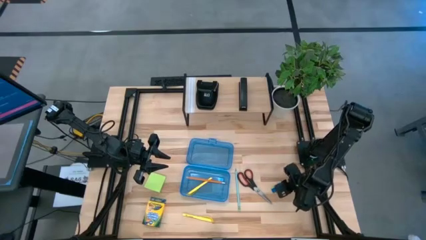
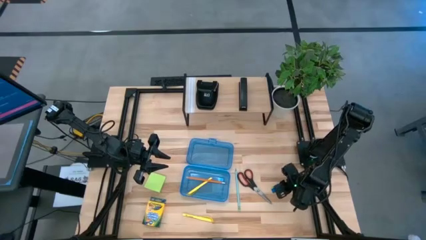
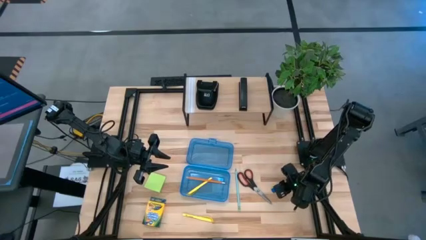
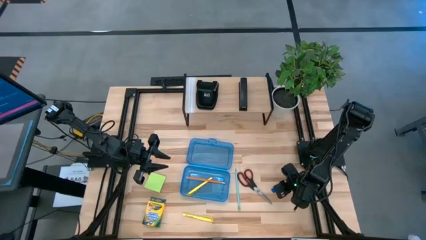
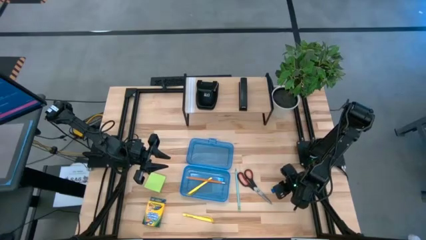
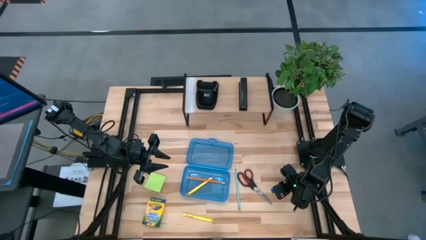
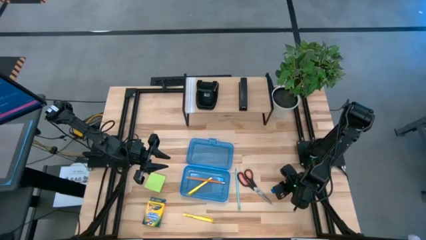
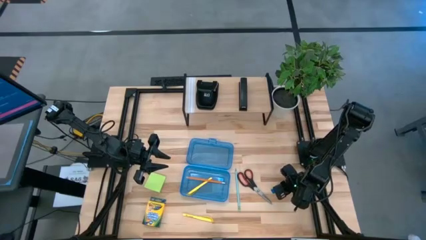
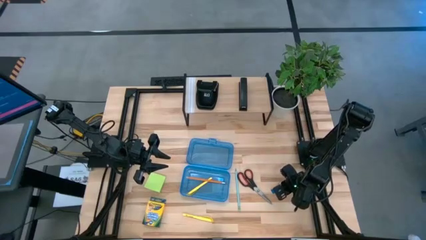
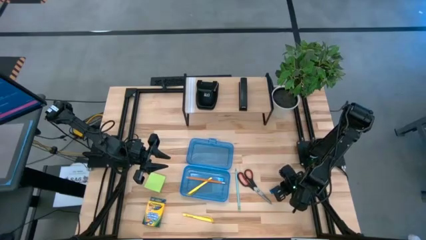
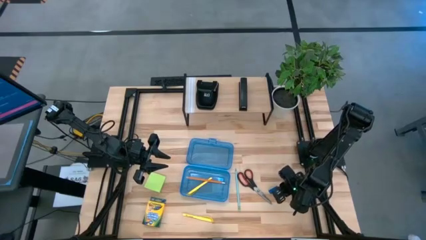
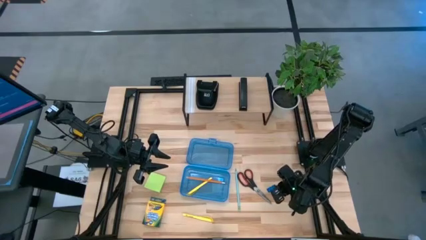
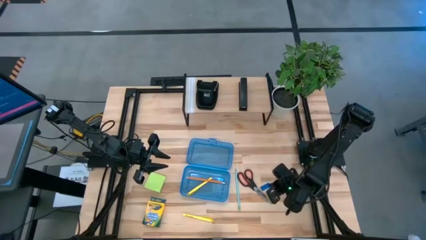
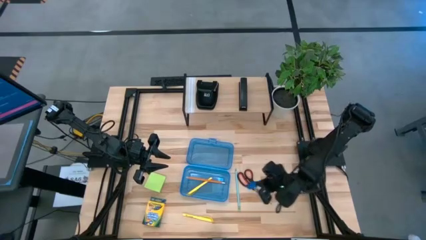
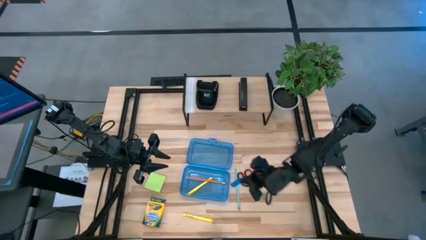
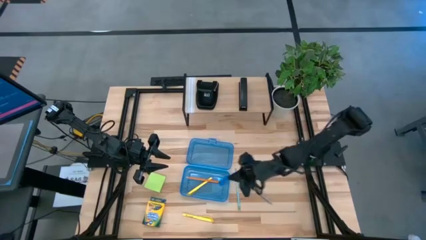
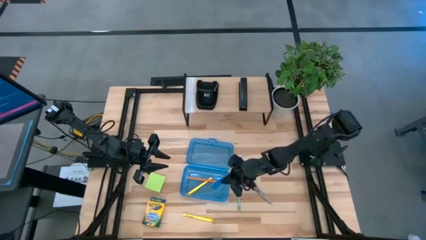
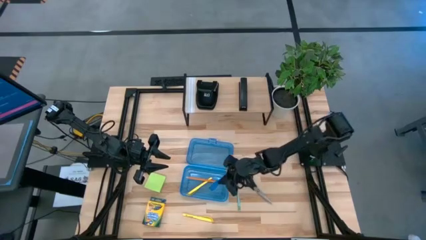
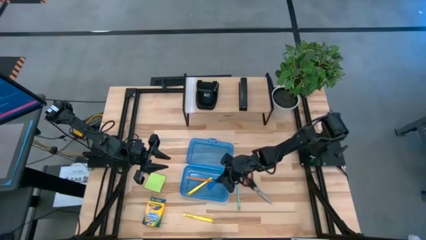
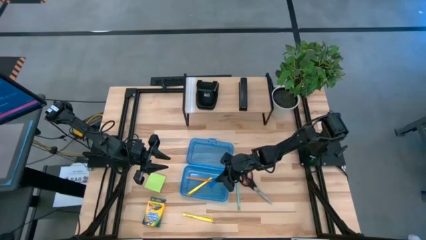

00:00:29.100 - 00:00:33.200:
Task: Pack school essentials
Put the blue eraser into the blue supply box

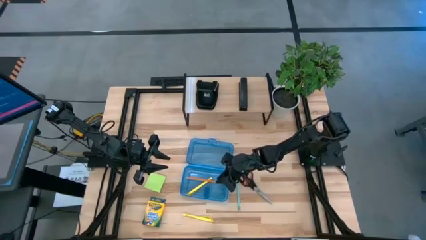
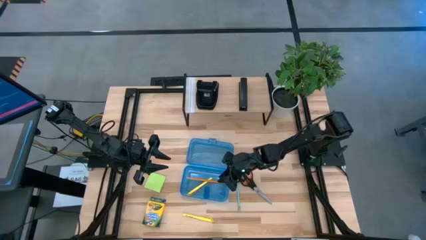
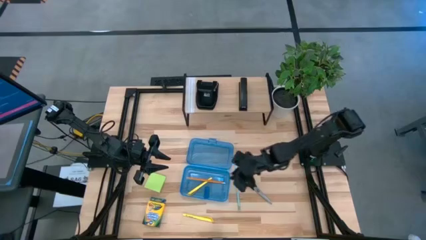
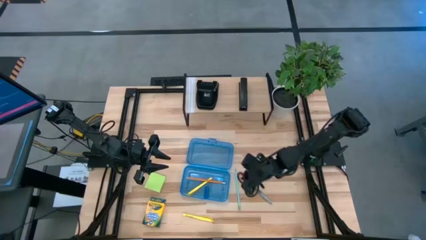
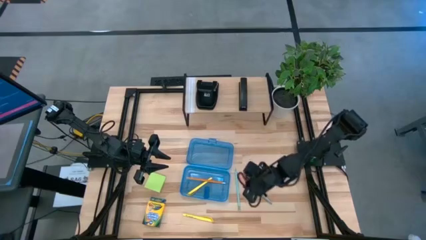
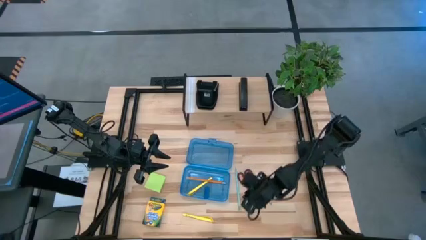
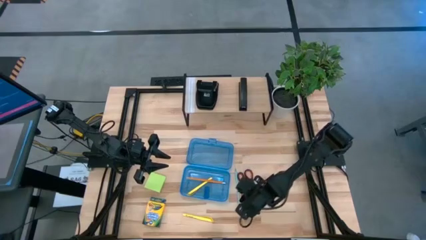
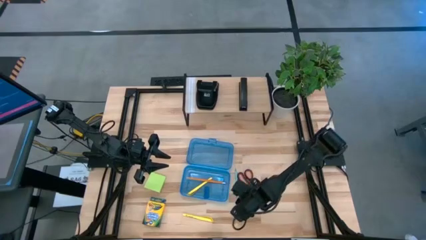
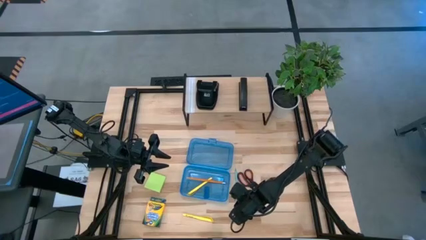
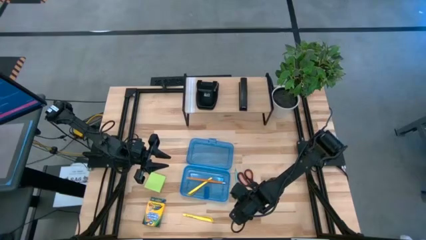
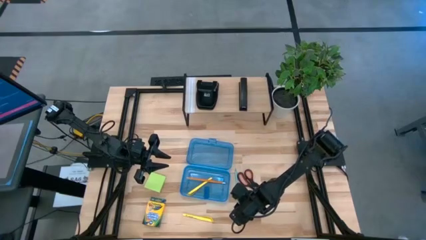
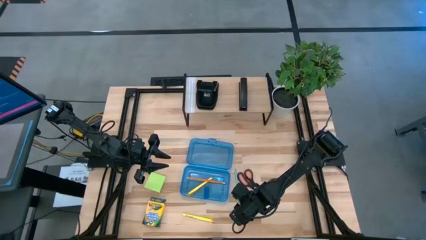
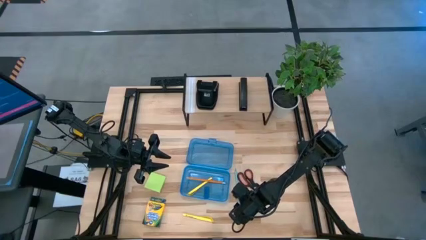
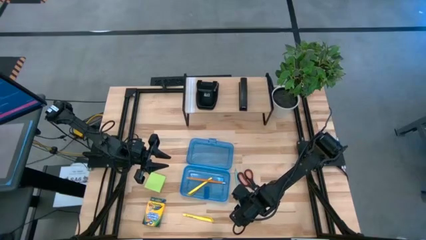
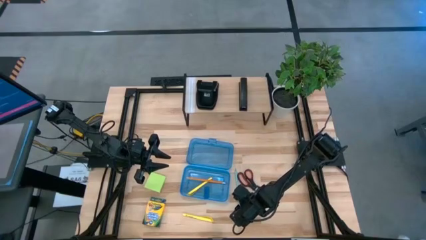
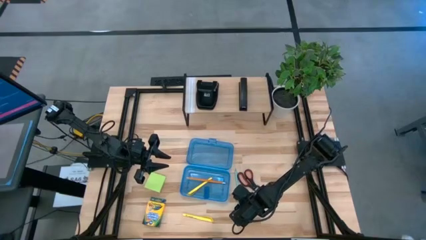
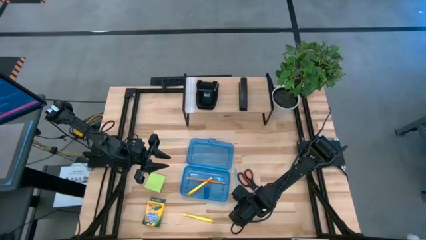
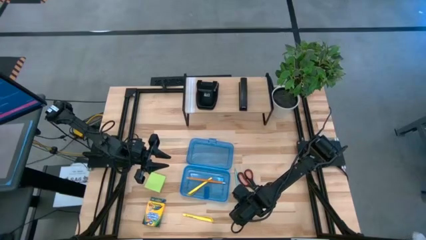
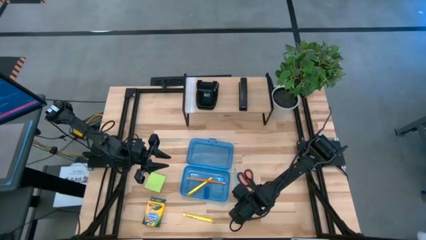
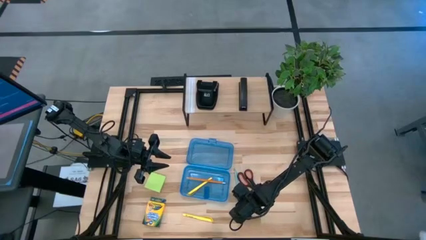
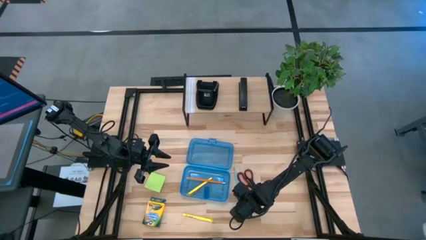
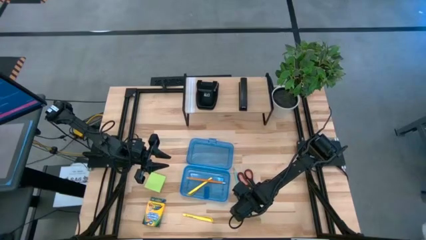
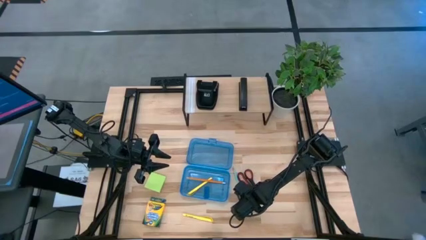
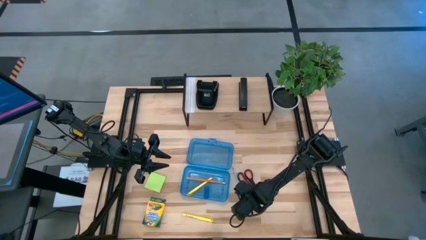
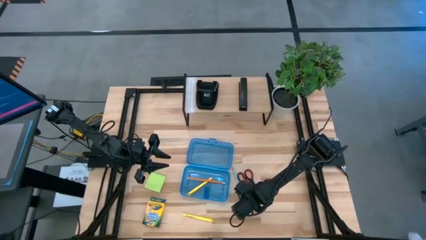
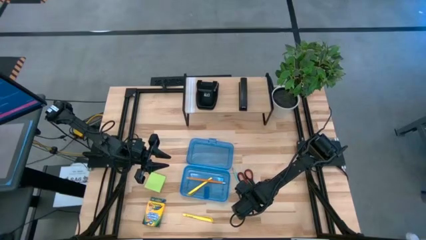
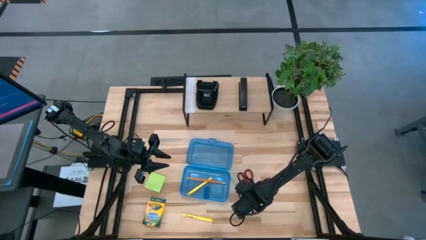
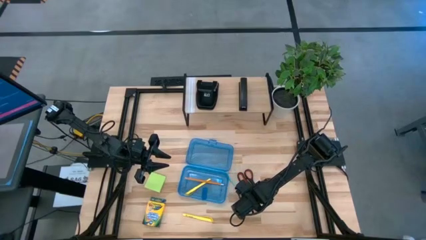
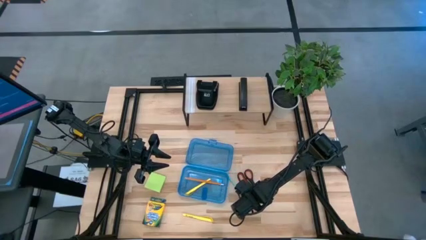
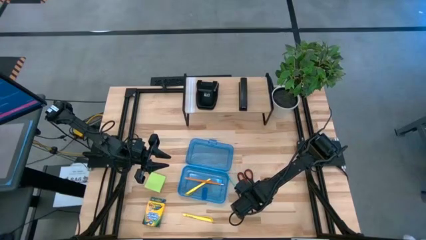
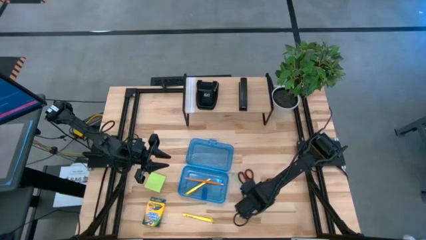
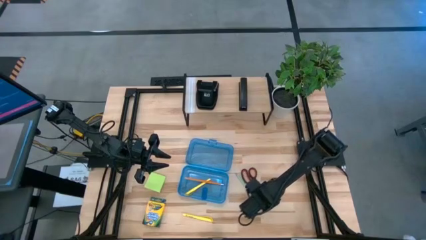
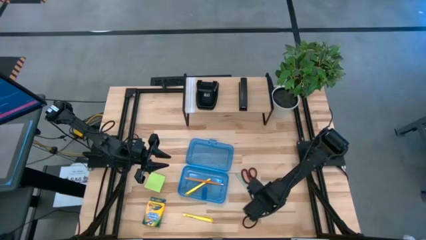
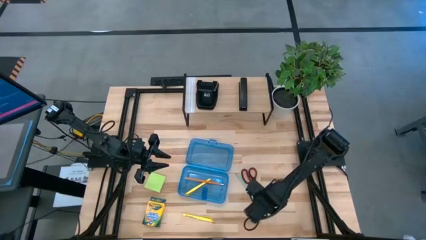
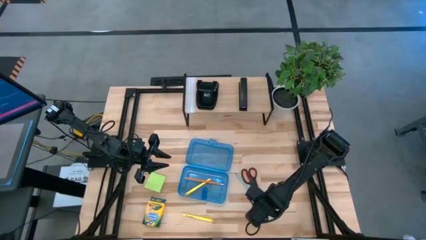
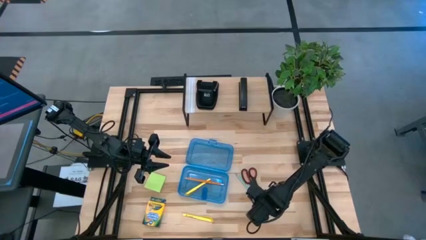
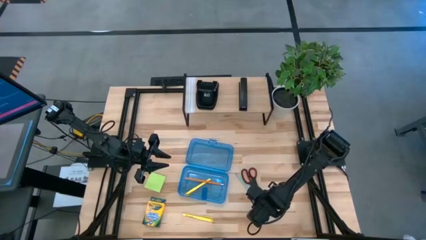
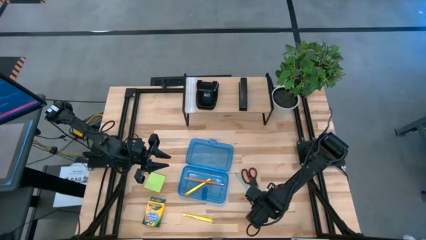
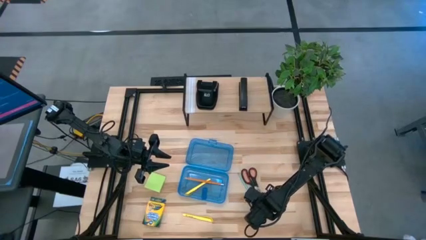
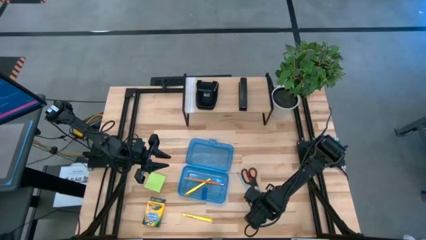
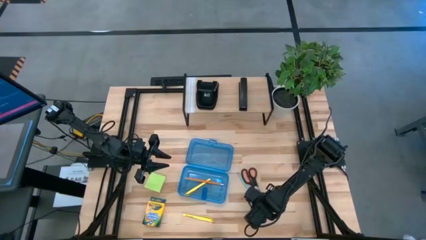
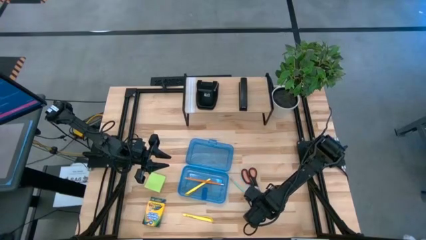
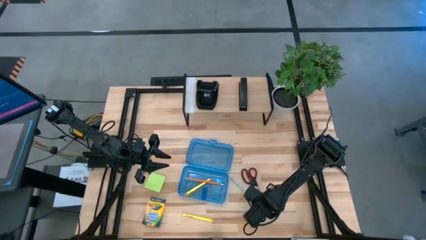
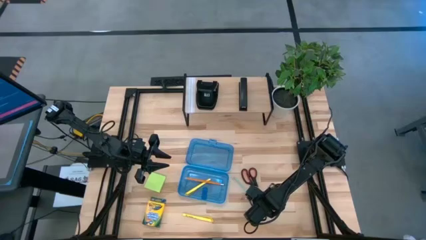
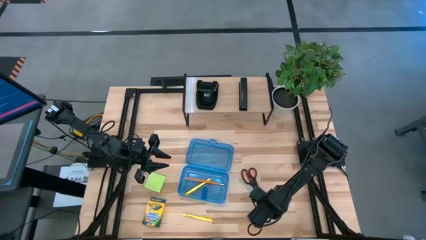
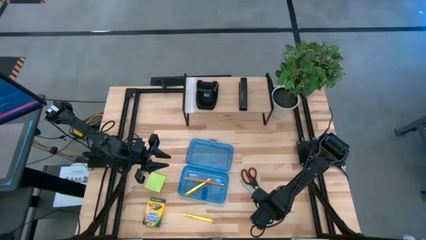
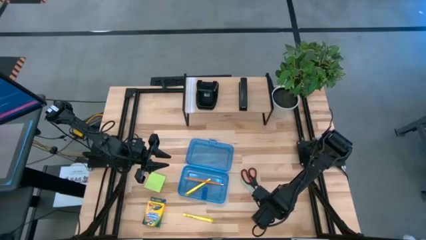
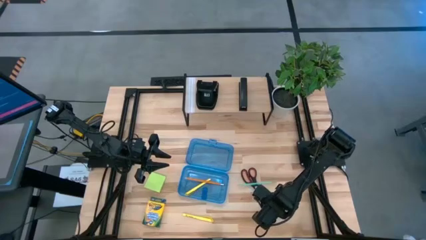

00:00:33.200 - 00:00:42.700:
Put the blue pencil into the blue supply box

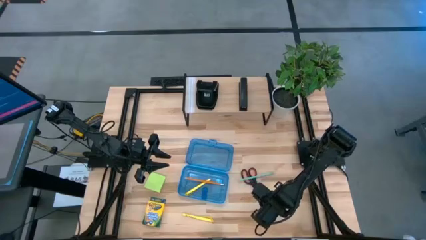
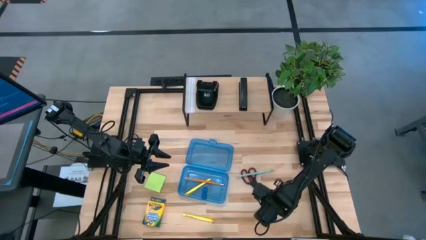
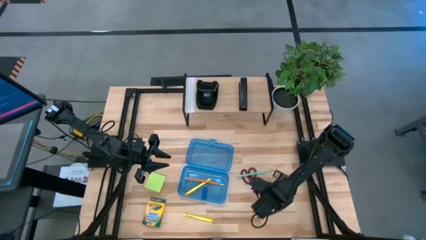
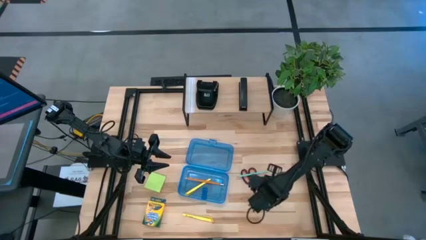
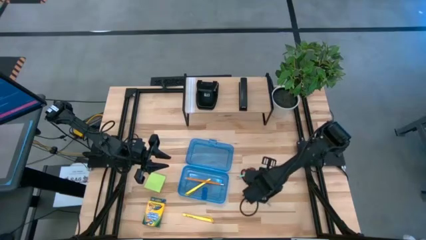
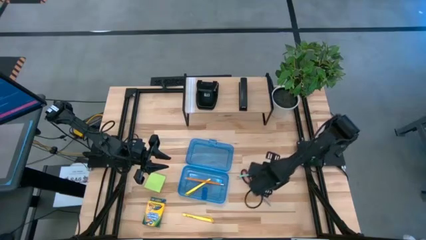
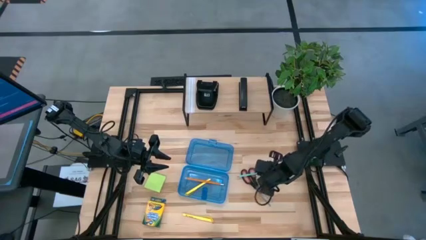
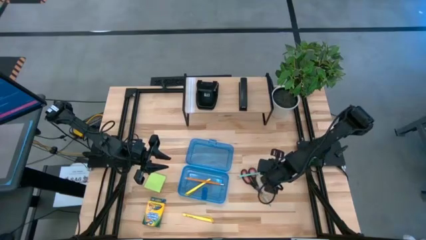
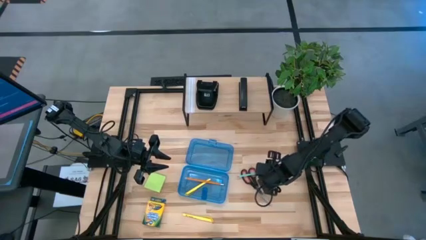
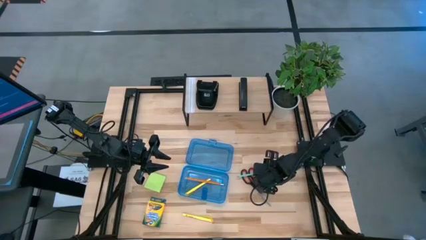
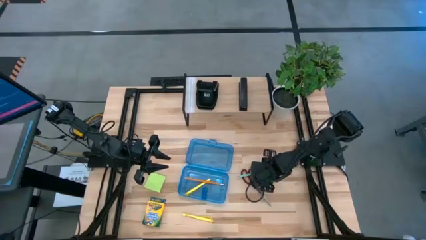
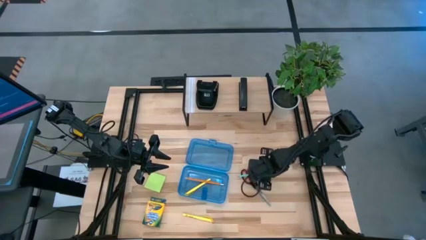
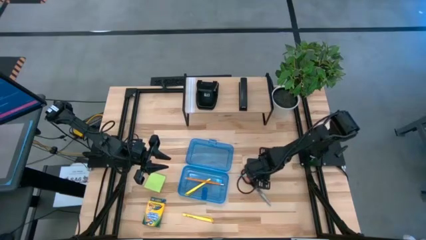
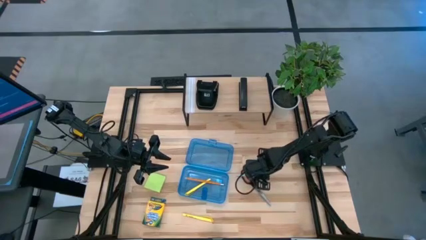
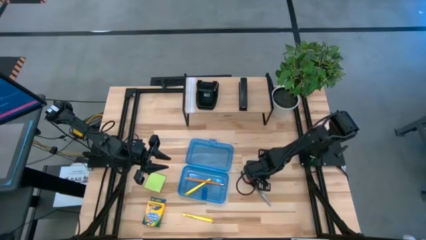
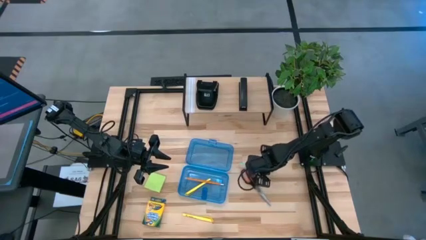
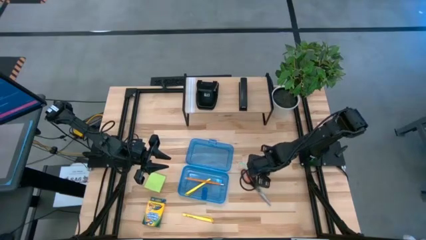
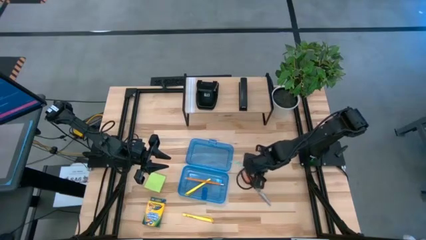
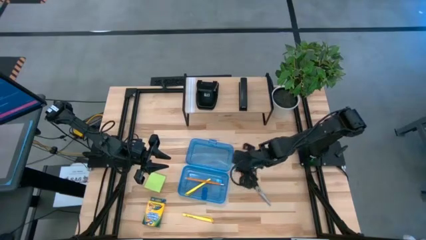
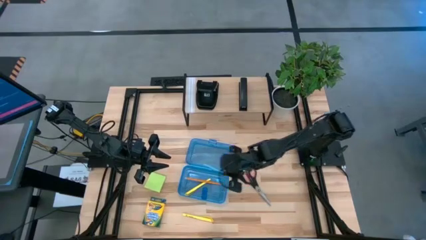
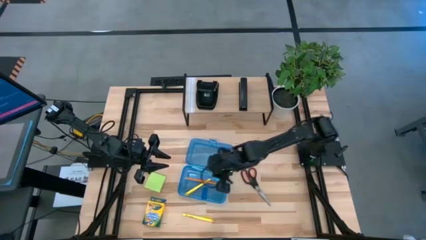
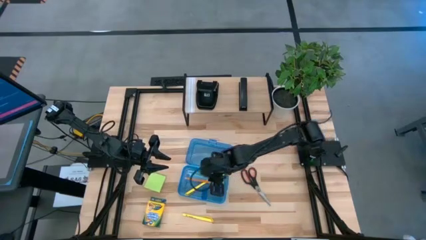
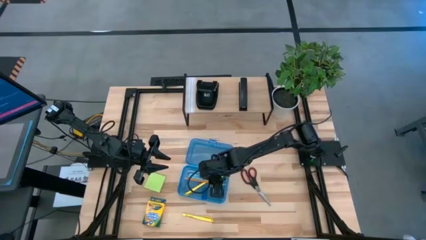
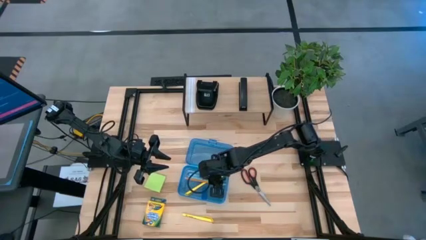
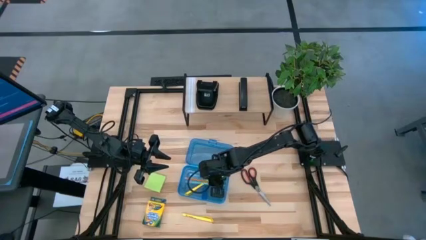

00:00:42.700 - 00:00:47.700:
Put the blue pencil into the blue supply box
